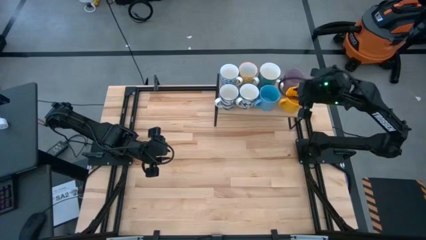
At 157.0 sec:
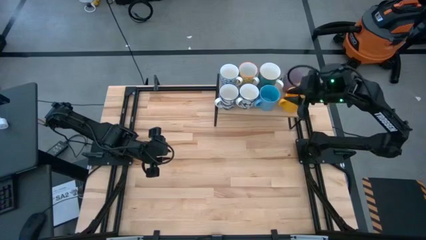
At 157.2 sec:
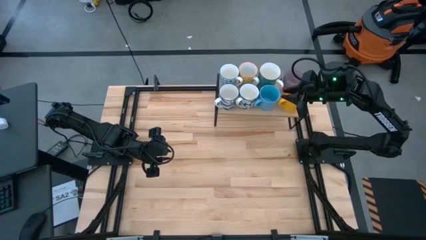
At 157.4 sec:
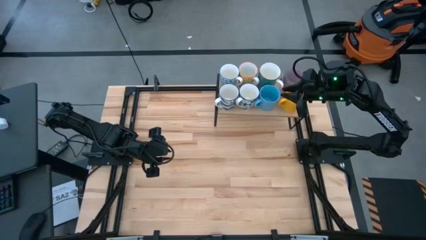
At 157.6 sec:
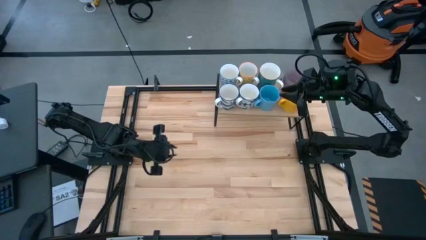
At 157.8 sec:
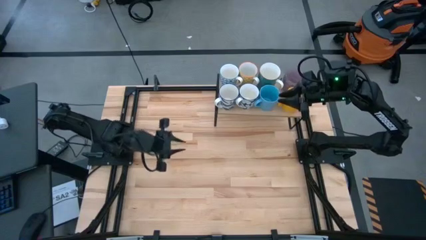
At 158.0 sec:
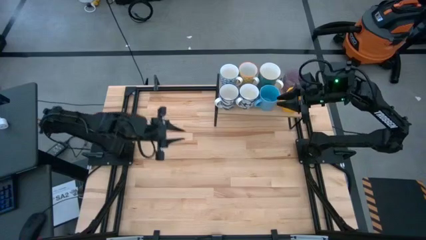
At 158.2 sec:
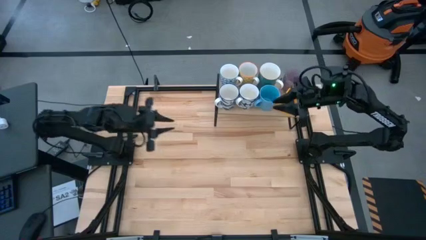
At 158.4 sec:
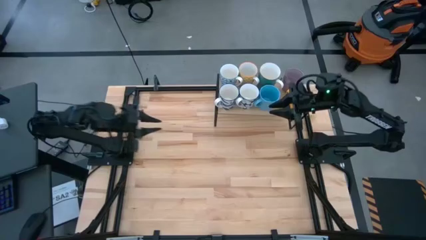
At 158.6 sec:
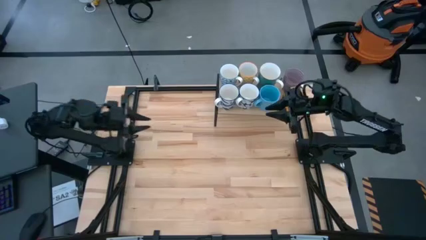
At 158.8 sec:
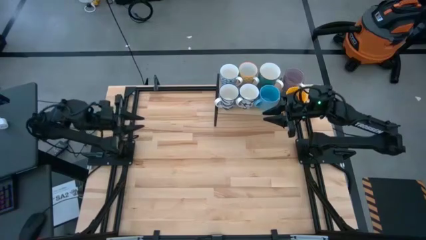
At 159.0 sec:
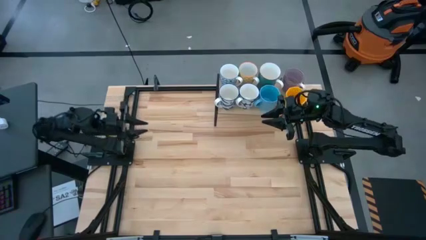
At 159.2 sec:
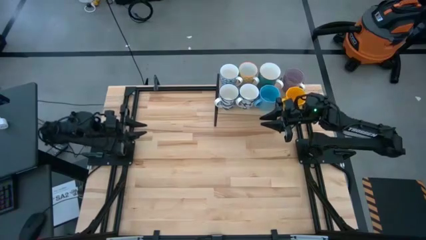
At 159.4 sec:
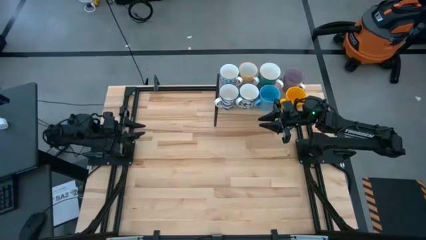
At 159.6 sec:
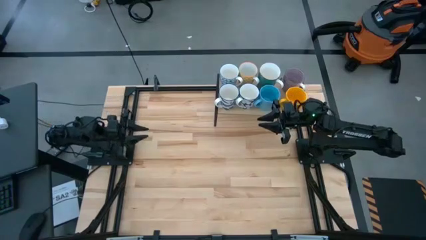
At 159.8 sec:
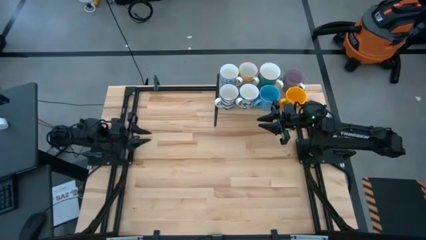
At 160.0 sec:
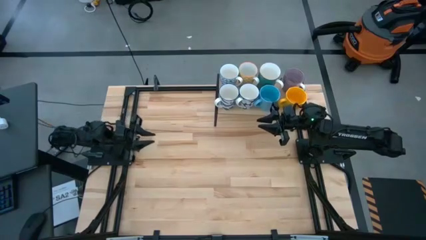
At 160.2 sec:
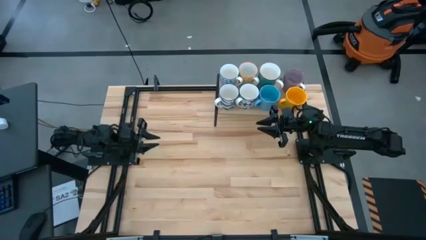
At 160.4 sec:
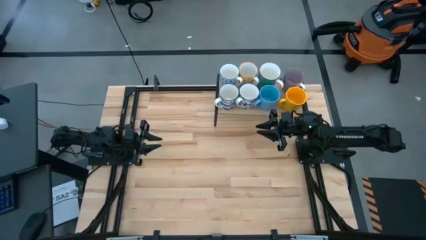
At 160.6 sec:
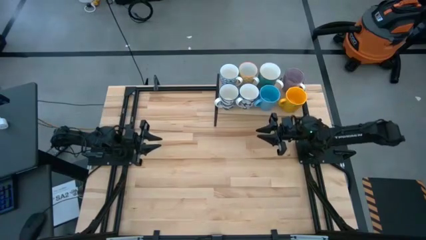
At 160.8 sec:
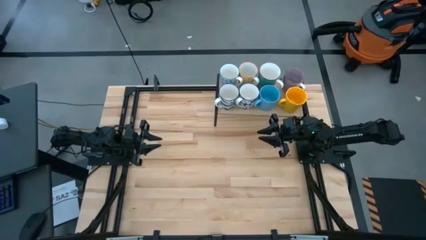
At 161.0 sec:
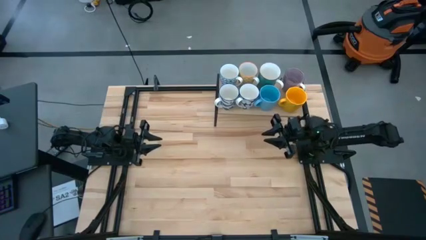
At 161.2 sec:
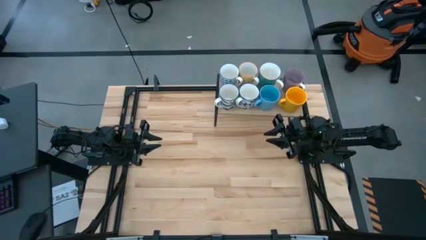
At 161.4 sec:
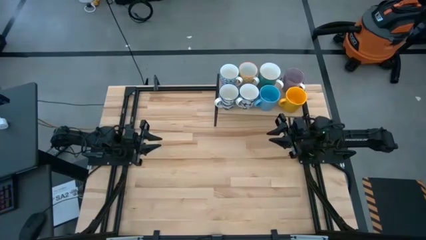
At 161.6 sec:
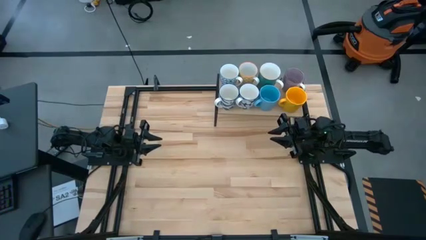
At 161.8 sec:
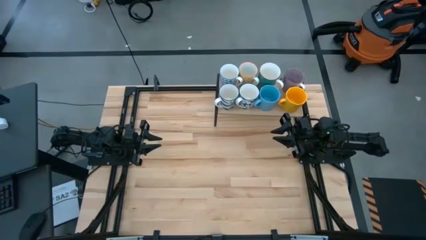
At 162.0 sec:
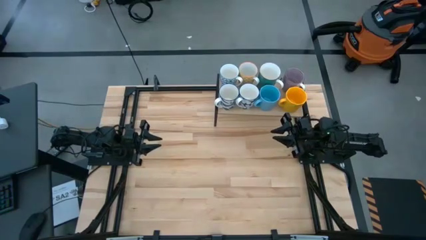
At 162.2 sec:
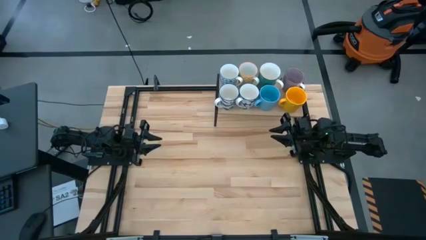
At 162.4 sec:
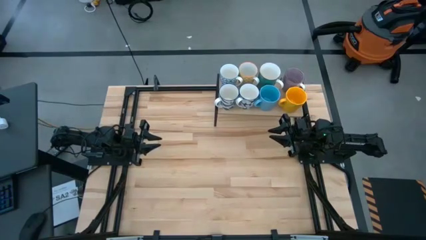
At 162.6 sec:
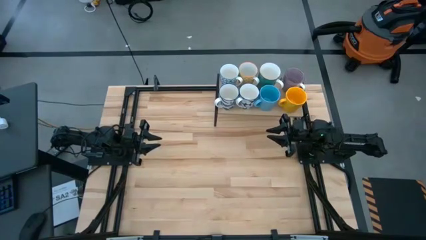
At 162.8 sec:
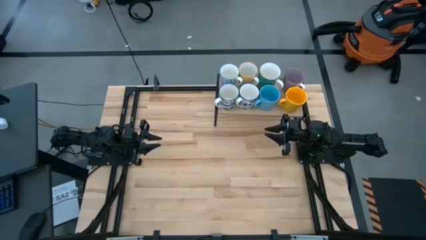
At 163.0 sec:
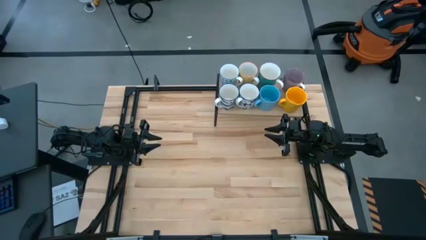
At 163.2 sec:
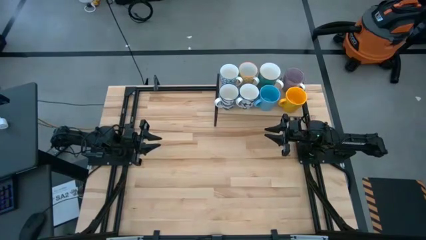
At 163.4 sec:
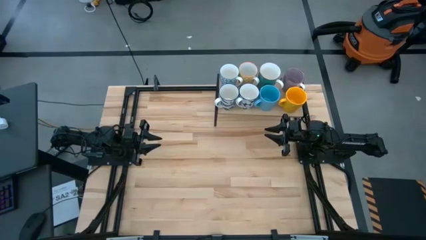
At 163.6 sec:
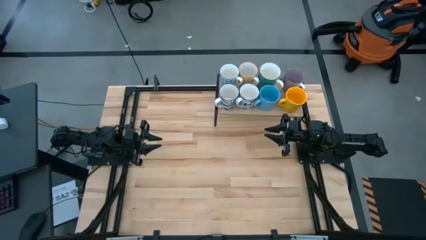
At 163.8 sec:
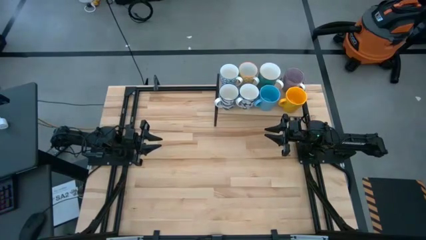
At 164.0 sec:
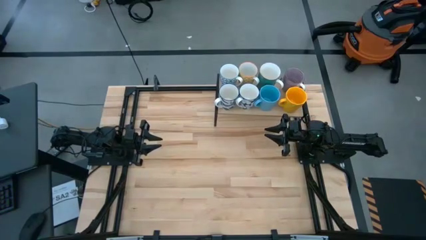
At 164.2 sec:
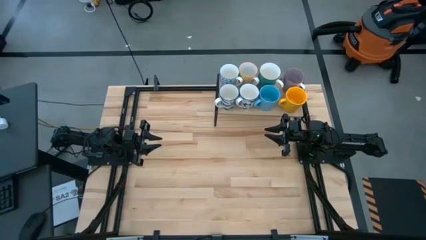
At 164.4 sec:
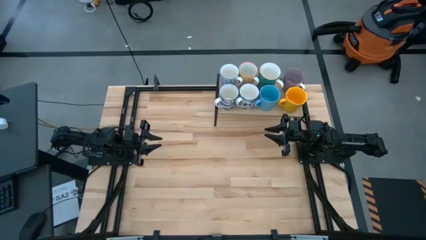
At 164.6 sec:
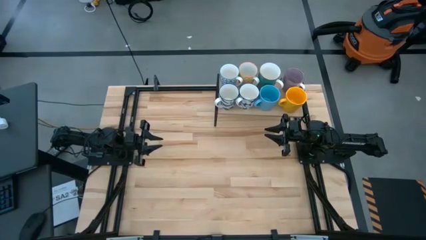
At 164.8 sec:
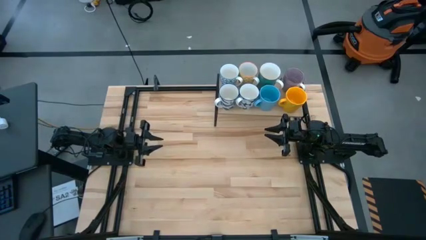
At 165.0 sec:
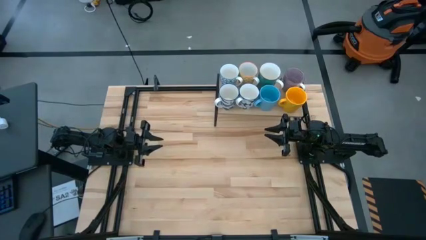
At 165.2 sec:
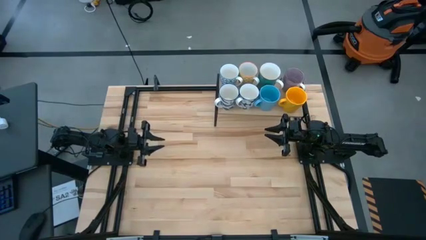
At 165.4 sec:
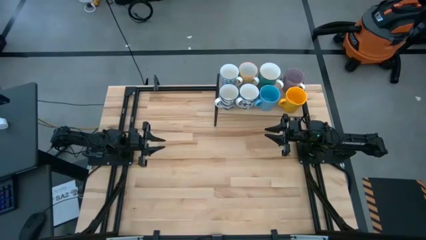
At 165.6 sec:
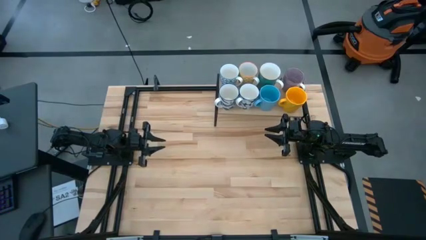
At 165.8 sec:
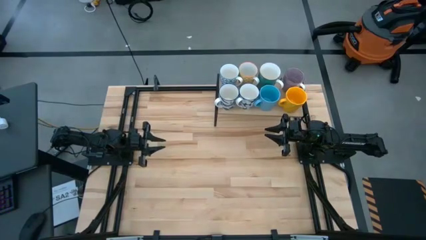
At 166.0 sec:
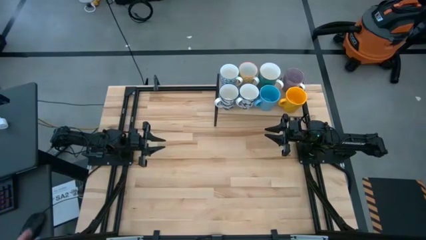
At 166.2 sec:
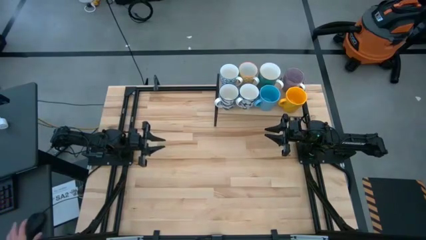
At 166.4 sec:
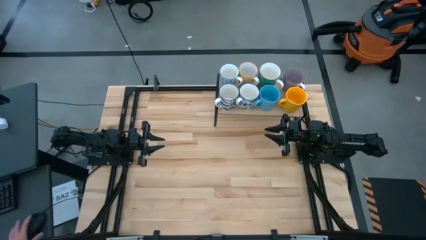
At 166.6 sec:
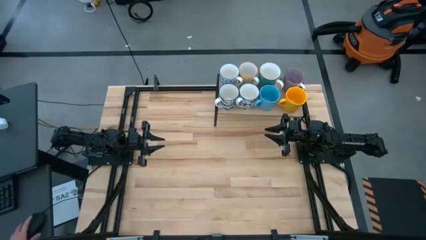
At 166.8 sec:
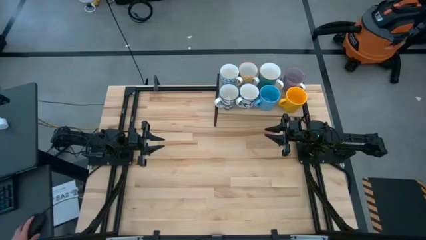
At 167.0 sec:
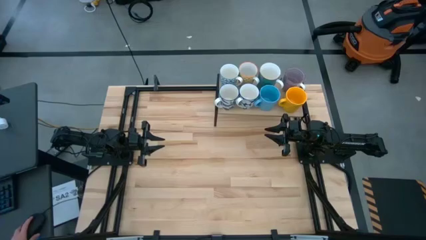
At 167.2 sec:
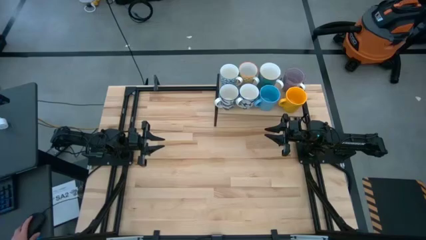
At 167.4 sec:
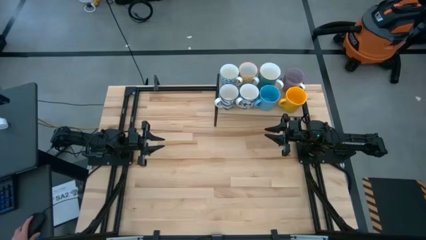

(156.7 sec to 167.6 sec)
Task: Place coffee mugs
Return to Home Position

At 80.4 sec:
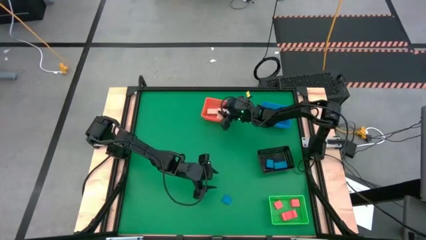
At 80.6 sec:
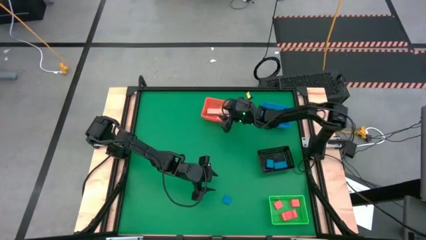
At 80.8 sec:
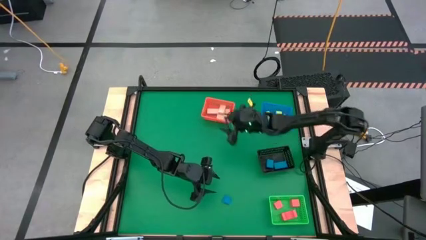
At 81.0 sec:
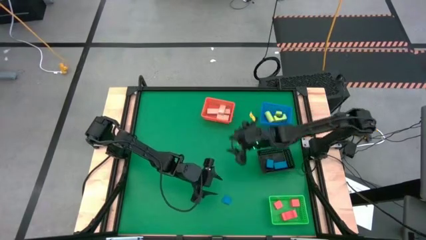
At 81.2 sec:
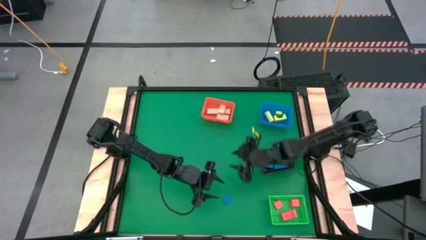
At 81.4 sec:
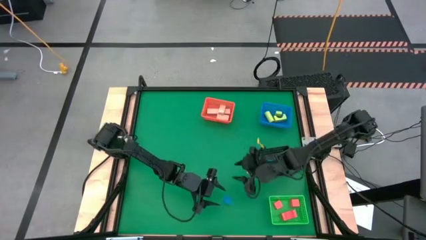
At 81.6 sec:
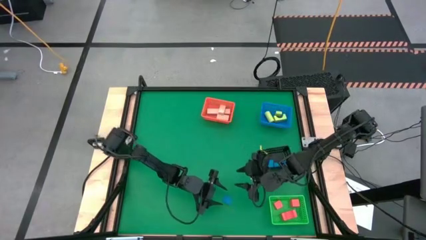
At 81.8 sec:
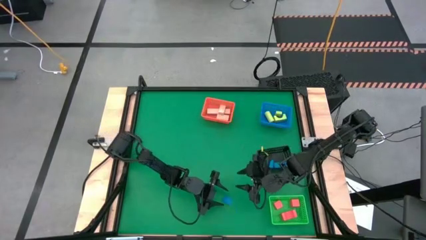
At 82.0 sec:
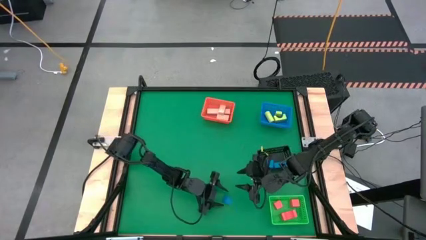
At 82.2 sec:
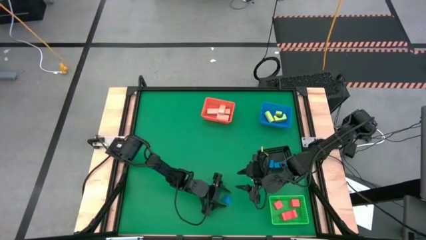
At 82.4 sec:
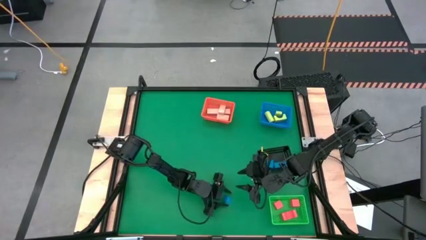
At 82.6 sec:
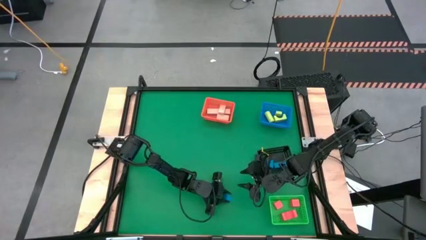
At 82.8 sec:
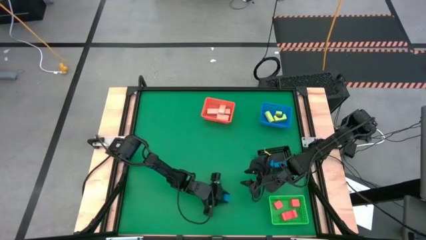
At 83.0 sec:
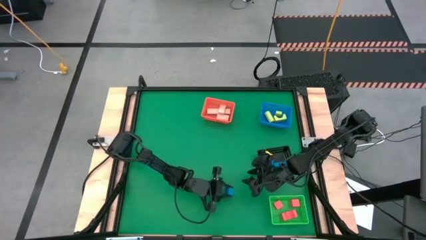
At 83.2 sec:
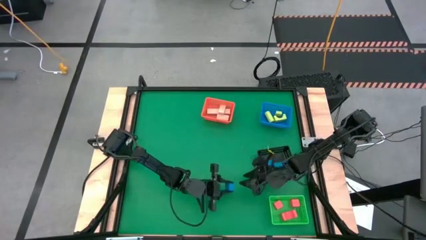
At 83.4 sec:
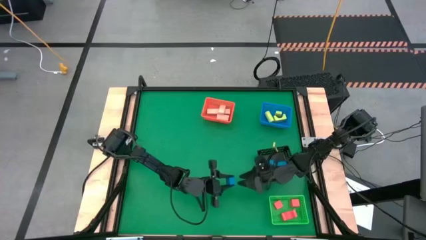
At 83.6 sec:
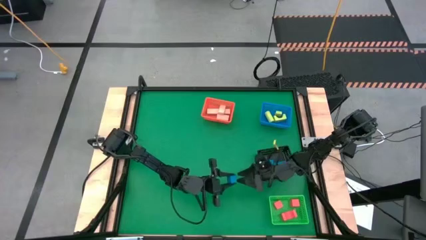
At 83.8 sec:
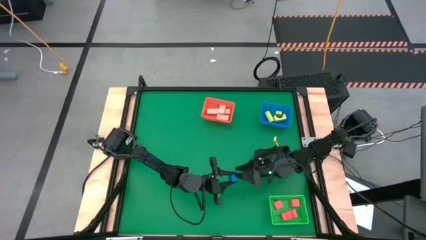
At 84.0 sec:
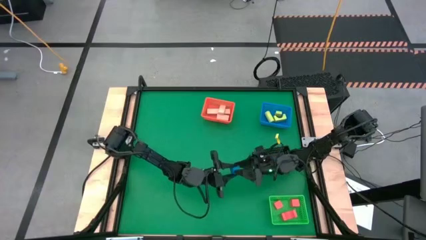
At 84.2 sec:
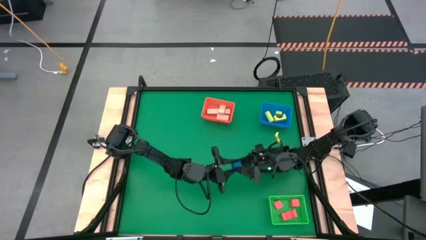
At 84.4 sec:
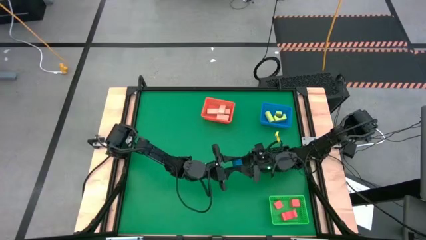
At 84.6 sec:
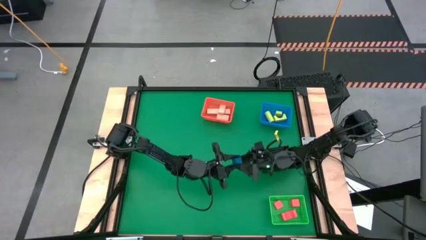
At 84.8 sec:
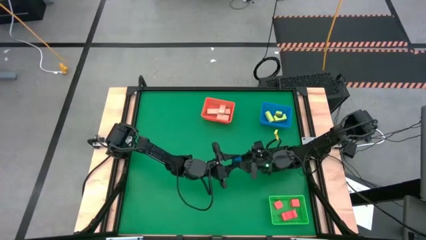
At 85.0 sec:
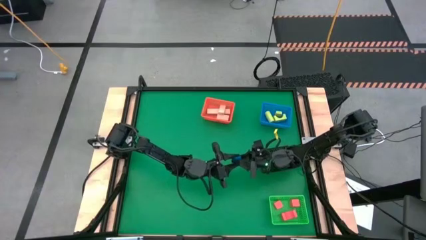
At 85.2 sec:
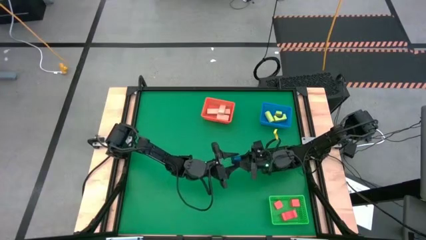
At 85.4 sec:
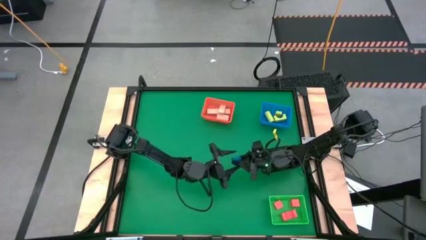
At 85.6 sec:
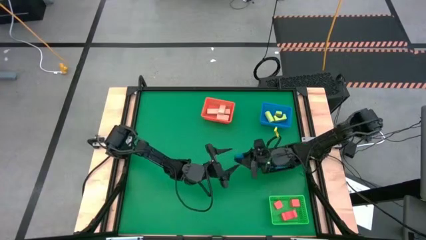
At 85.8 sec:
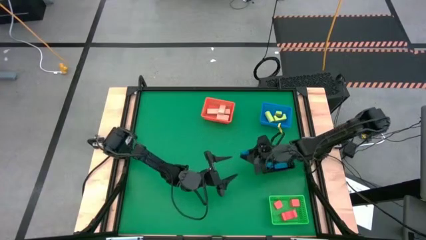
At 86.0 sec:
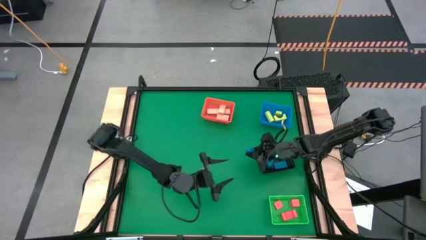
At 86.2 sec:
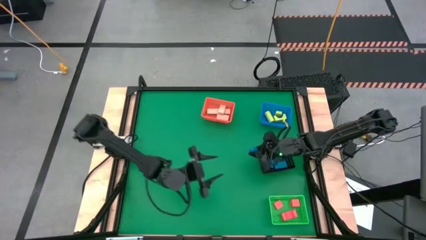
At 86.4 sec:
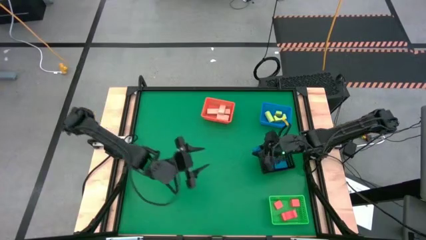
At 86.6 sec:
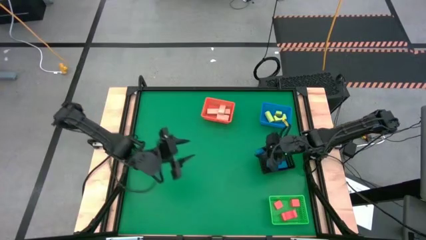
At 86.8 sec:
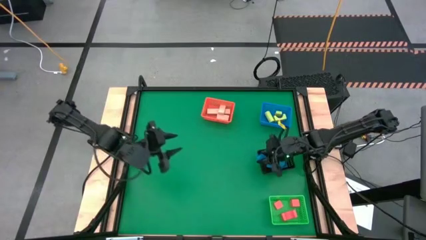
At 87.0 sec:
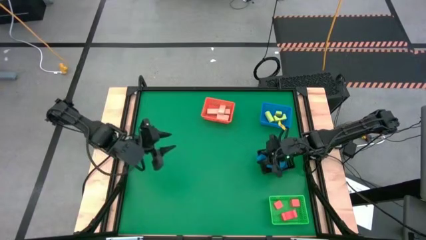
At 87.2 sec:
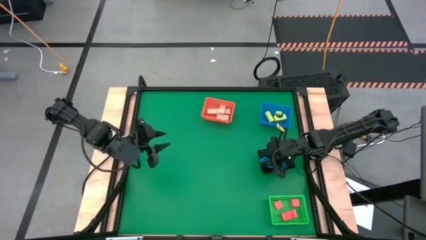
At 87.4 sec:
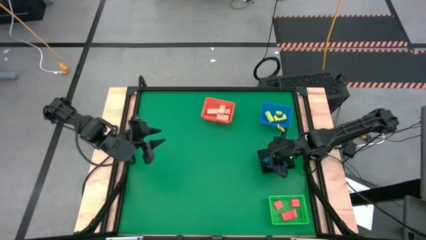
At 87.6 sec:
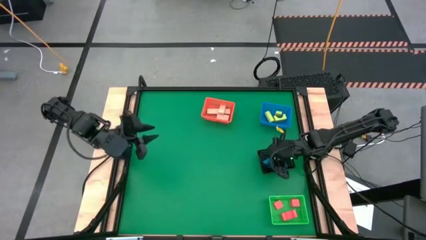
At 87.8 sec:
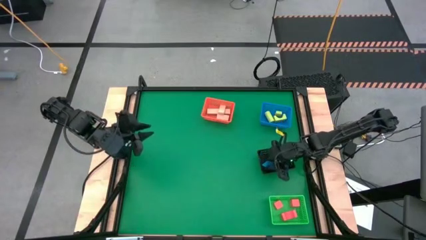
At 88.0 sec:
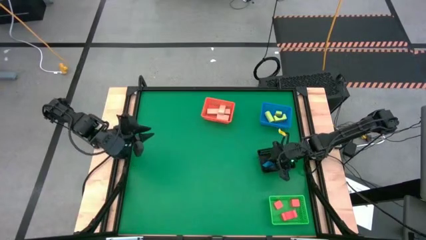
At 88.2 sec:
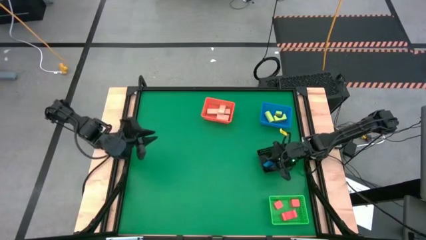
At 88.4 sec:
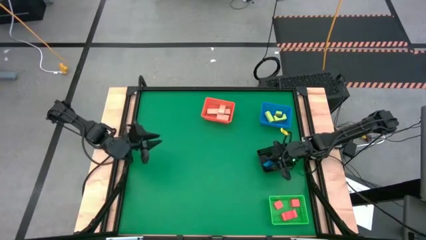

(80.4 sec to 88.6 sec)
Task: Sort & place blocks by color
Put the blue block into the black bin
